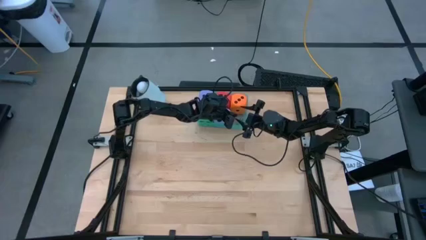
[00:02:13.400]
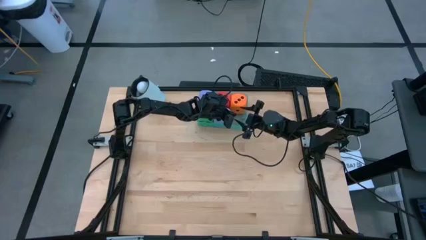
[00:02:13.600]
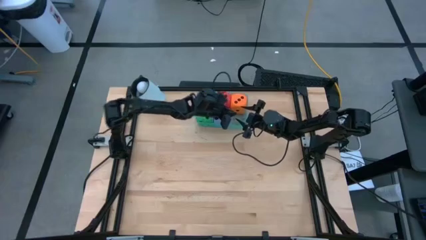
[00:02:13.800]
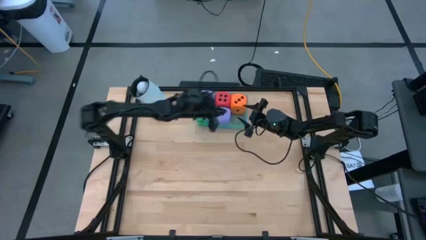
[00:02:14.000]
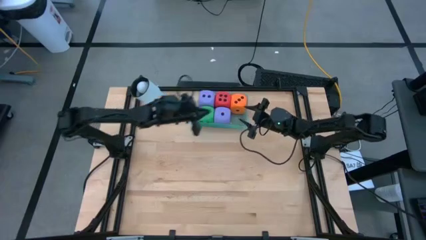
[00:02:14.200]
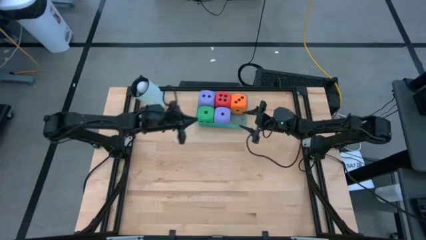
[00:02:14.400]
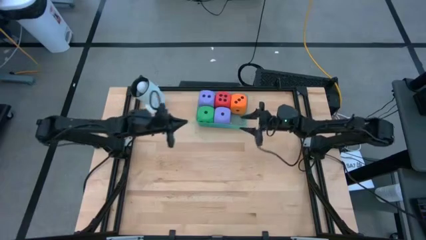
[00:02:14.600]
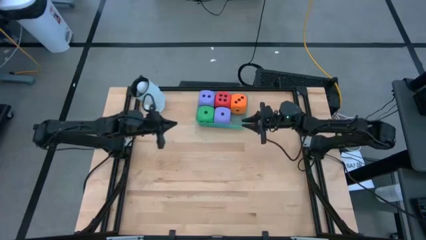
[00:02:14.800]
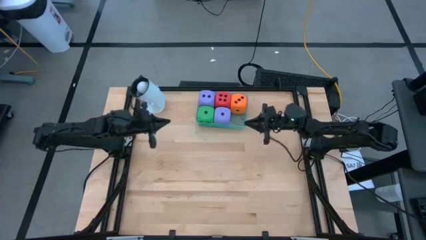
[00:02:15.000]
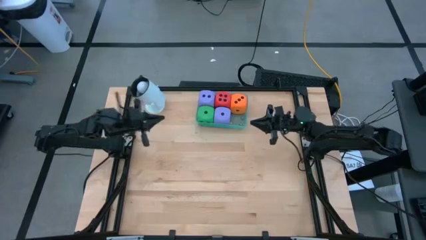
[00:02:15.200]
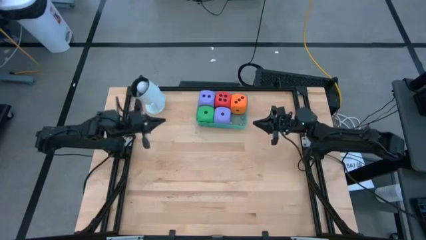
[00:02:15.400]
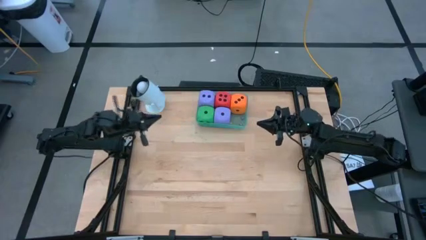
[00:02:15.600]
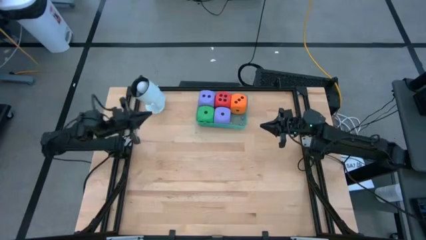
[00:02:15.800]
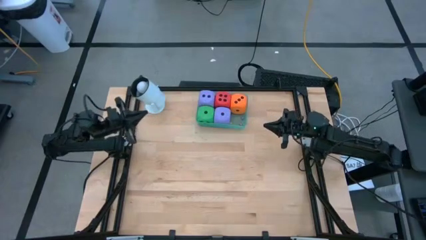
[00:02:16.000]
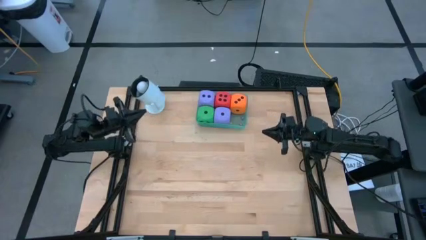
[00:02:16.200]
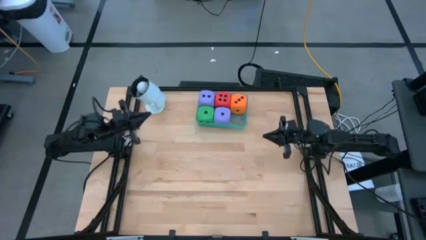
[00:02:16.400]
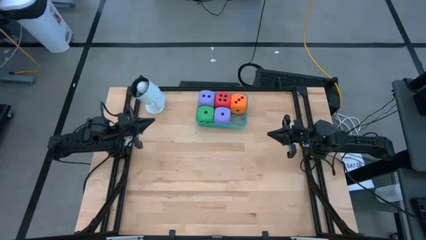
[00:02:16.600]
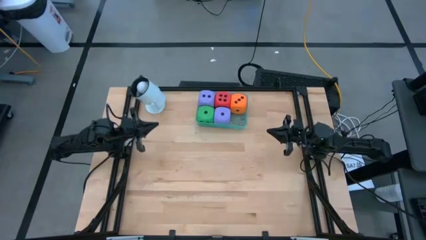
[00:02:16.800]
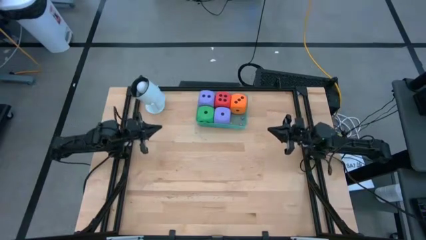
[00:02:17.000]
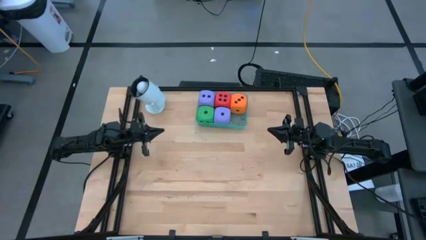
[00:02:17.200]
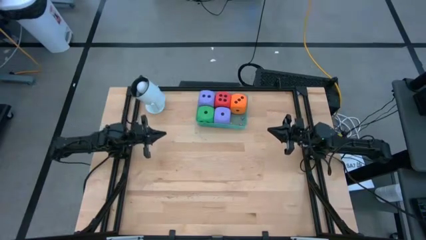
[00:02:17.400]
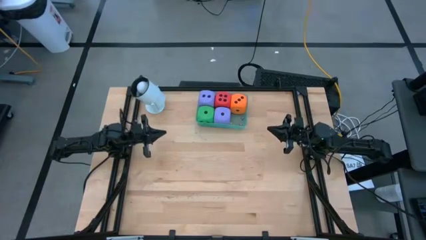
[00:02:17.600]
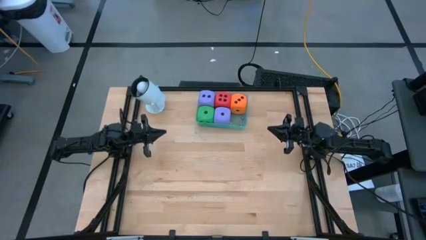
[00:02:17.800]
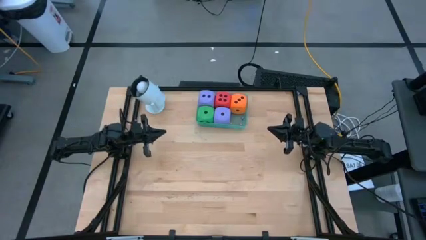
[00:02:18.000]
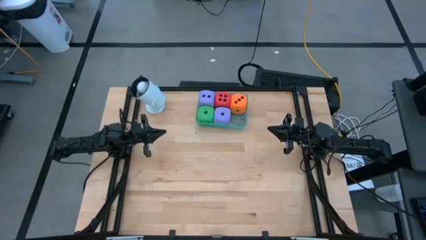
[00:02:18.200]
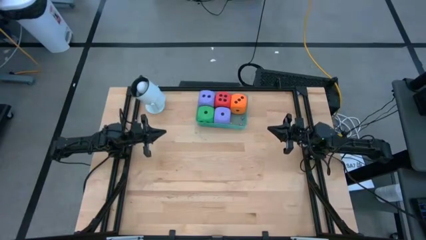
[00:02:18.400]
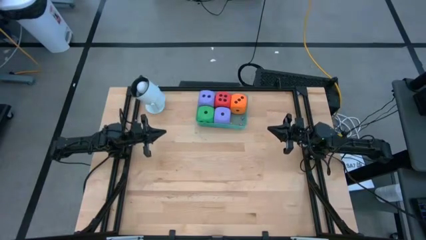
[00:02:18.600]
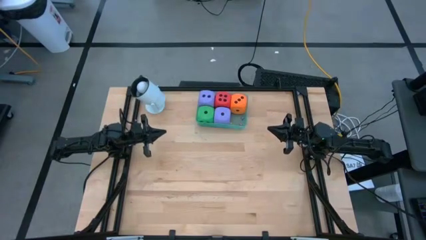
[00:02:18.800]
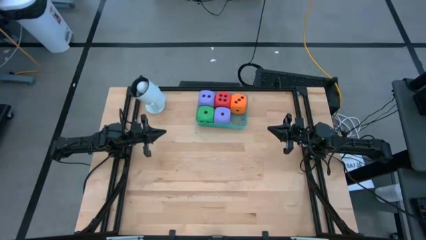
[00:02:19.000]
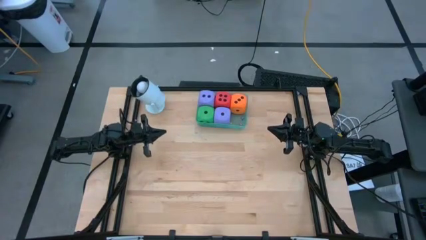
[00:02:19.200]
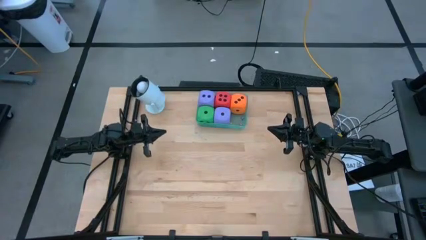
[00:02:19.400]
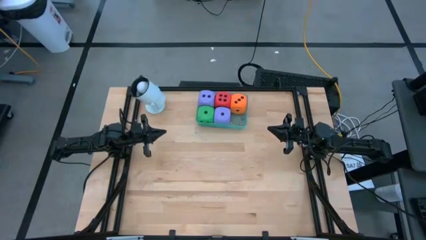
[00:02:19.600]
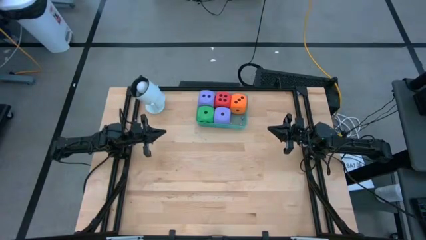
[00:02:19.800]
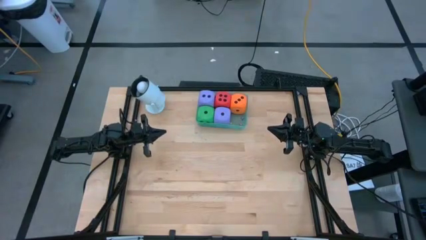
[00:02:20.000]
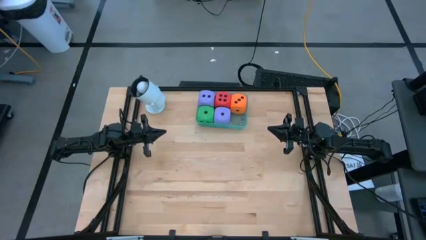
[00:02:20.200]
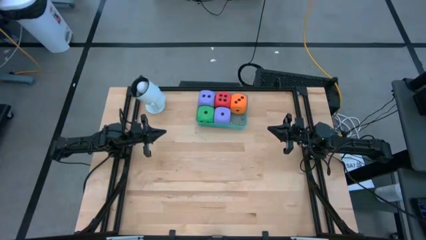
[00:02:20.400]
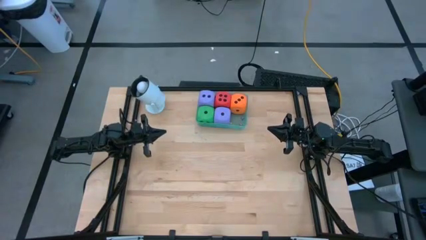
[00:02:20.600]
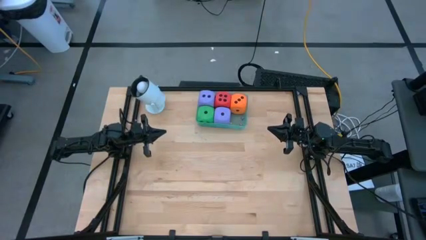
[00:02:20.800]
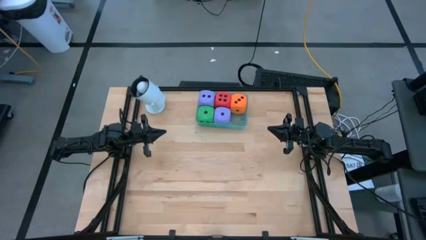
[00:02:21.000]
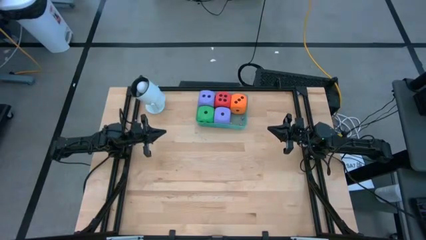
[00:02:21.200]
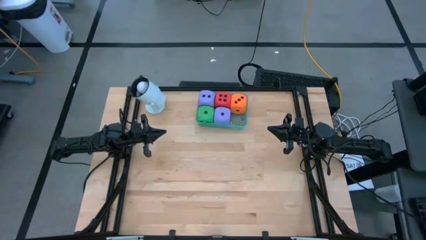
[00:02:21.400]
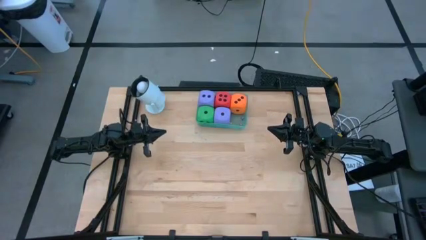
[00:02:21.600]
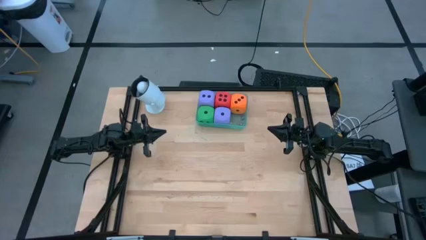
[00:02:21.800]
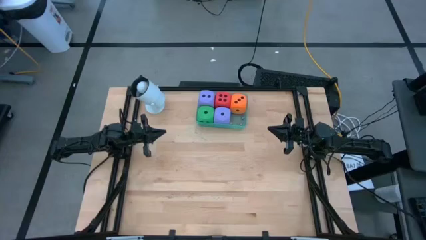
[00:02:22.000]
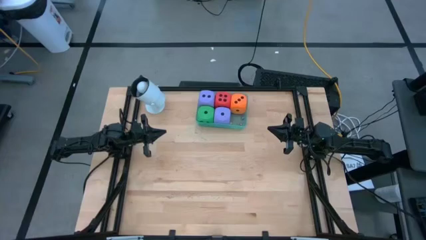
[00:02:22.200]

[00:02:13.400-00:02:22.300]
Task: Pick & Place Dice
Return to Home Position
